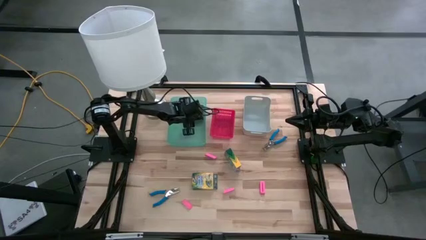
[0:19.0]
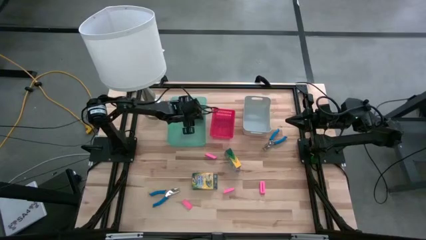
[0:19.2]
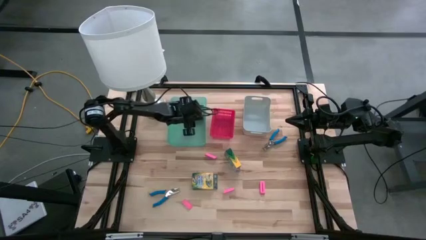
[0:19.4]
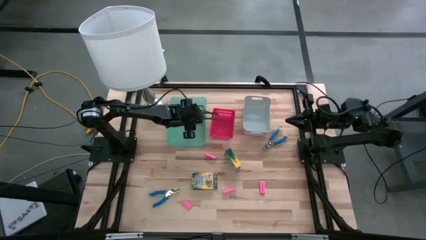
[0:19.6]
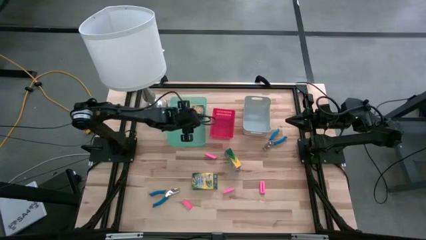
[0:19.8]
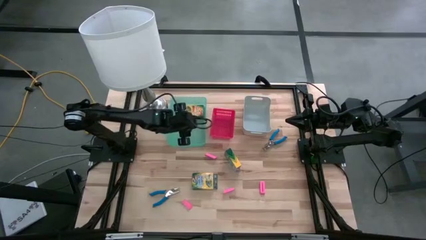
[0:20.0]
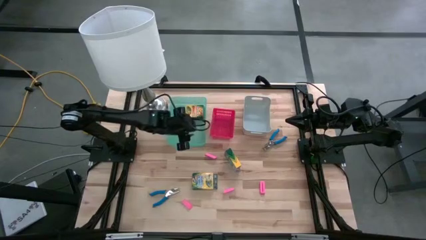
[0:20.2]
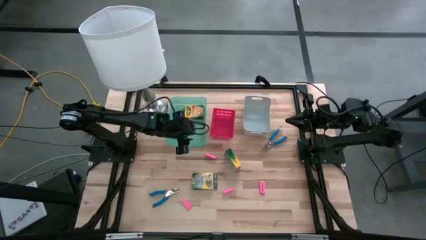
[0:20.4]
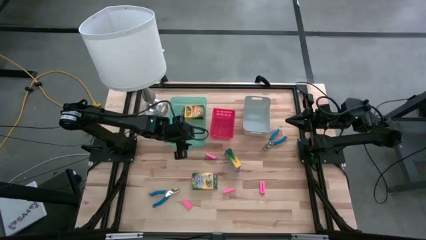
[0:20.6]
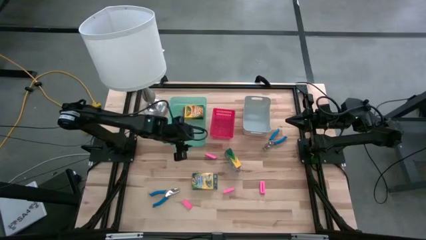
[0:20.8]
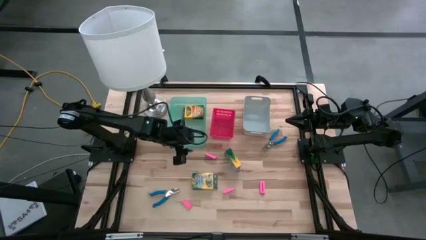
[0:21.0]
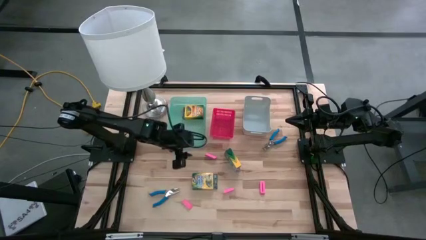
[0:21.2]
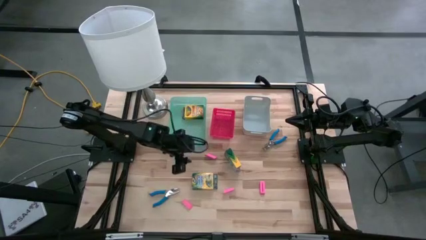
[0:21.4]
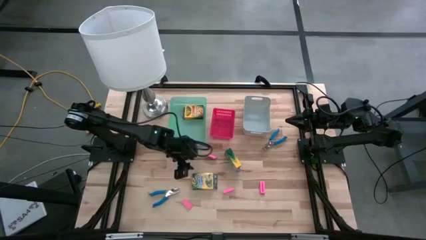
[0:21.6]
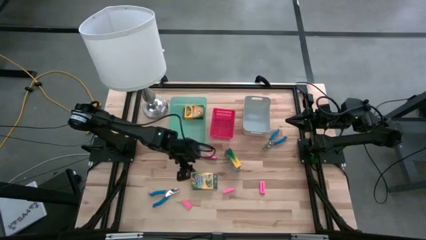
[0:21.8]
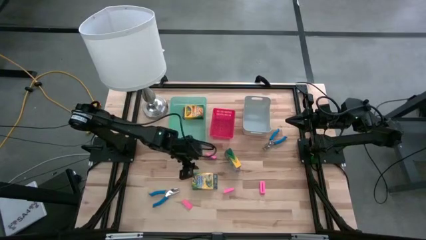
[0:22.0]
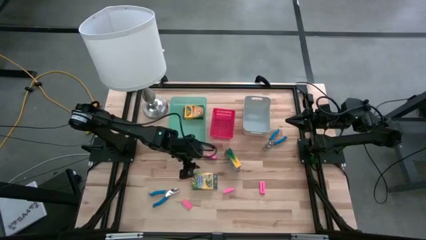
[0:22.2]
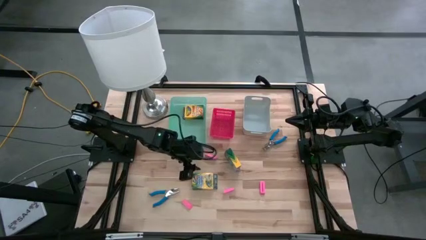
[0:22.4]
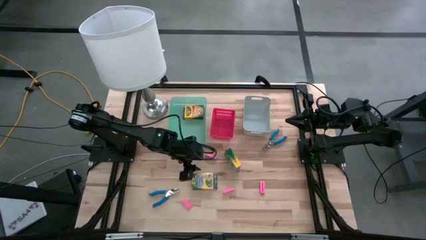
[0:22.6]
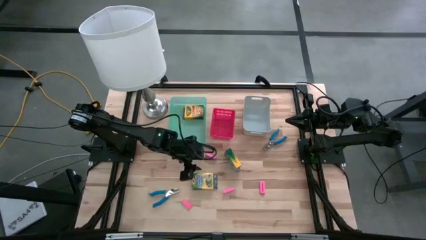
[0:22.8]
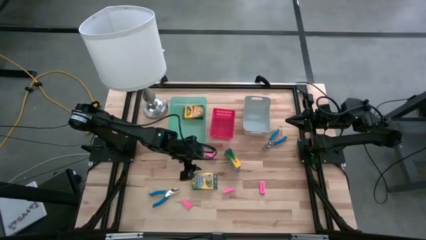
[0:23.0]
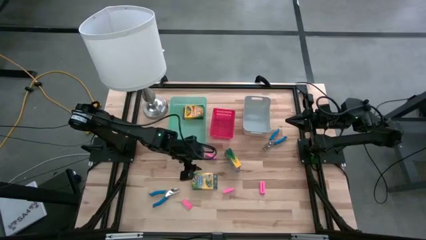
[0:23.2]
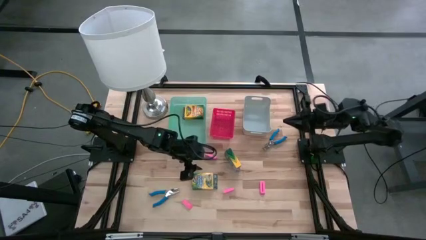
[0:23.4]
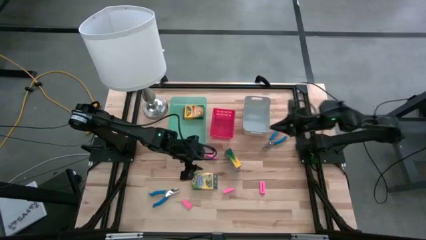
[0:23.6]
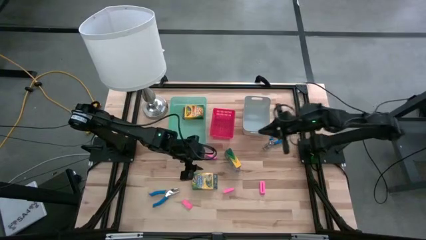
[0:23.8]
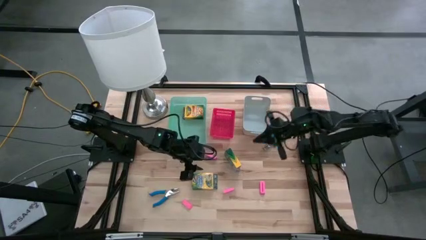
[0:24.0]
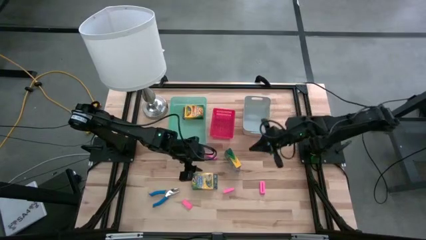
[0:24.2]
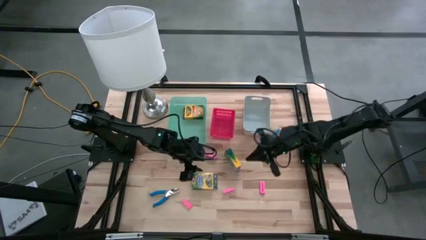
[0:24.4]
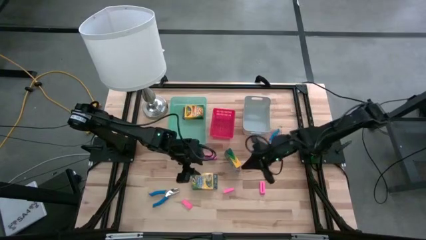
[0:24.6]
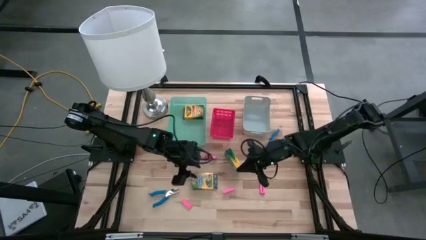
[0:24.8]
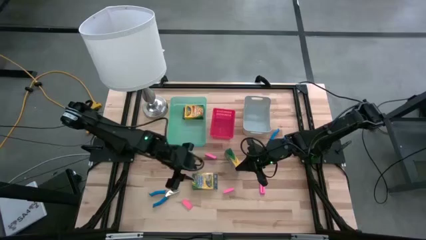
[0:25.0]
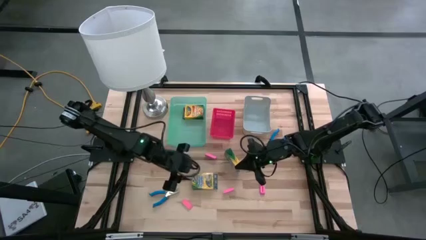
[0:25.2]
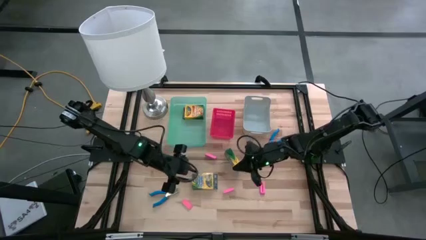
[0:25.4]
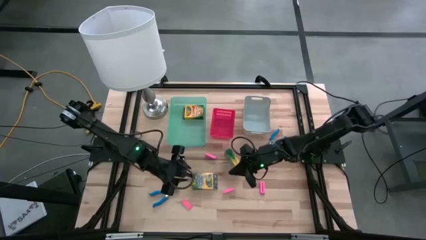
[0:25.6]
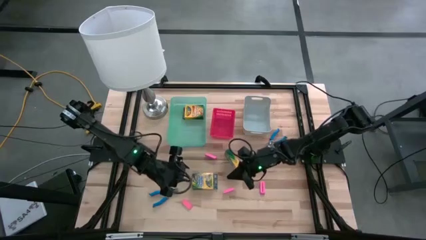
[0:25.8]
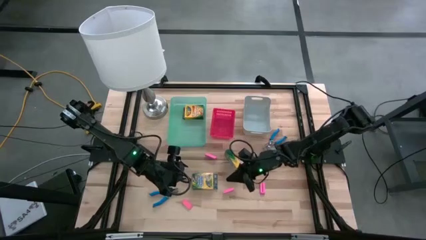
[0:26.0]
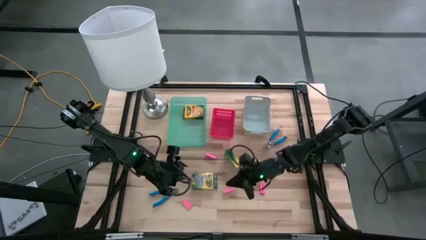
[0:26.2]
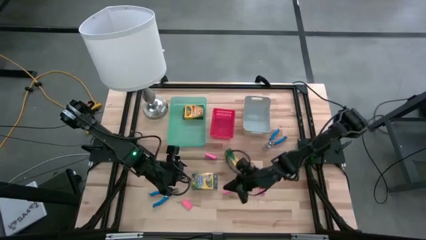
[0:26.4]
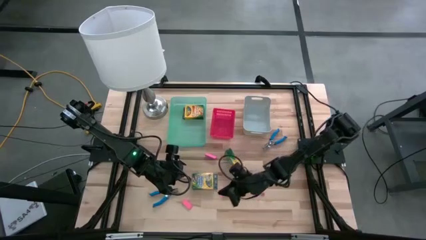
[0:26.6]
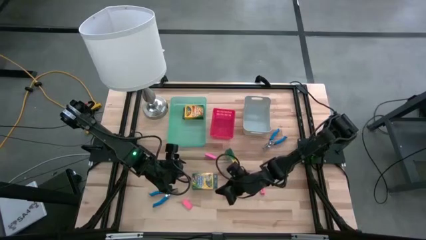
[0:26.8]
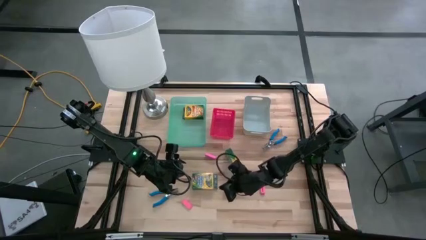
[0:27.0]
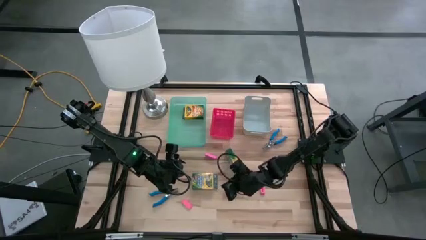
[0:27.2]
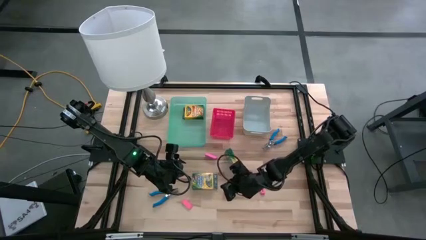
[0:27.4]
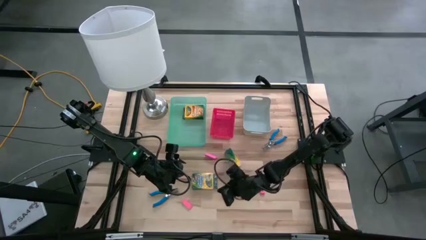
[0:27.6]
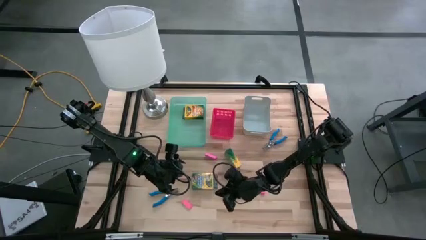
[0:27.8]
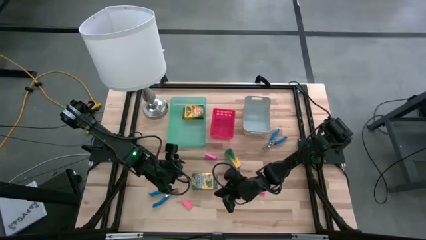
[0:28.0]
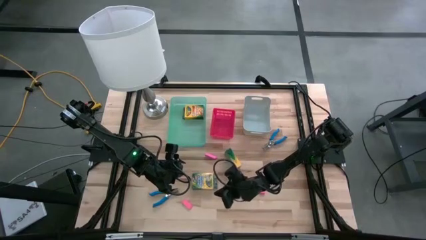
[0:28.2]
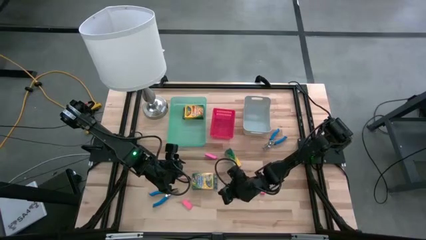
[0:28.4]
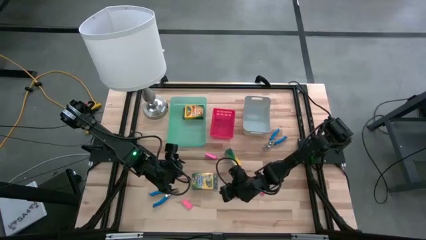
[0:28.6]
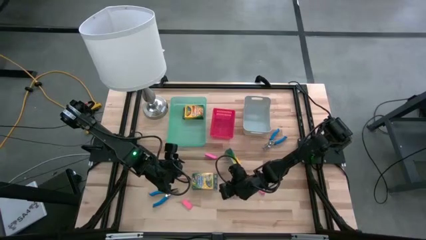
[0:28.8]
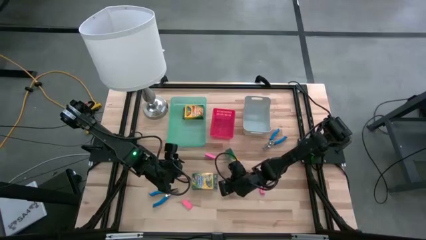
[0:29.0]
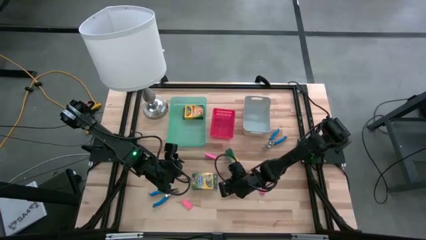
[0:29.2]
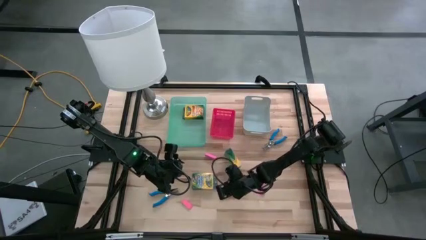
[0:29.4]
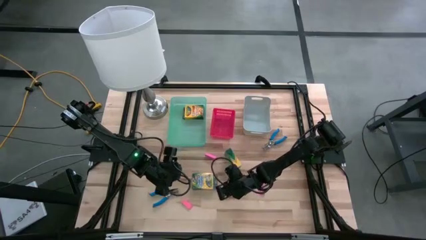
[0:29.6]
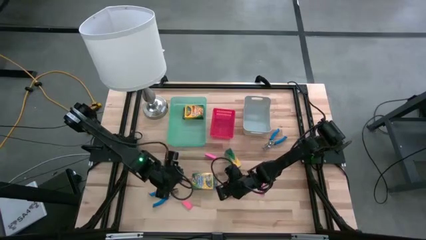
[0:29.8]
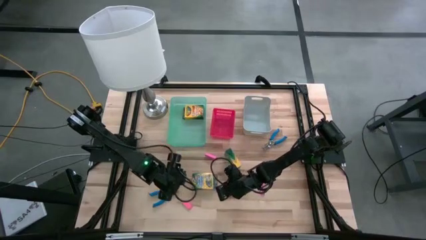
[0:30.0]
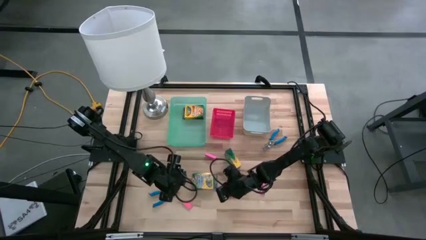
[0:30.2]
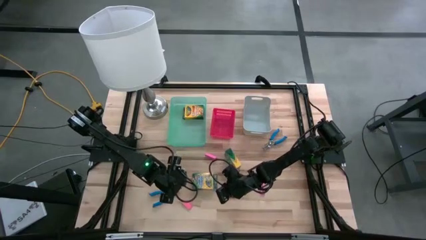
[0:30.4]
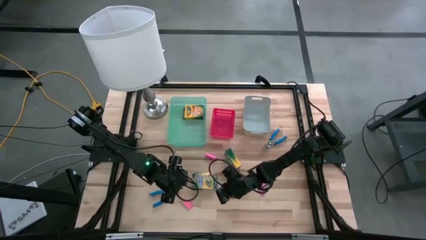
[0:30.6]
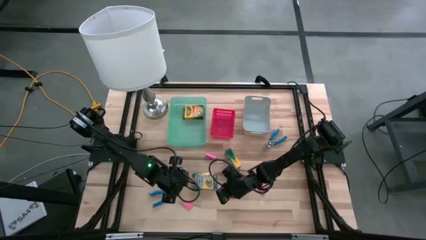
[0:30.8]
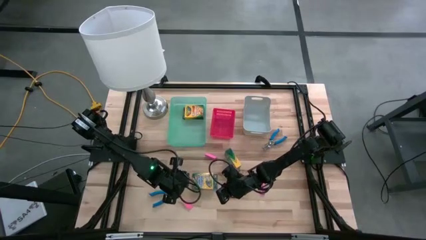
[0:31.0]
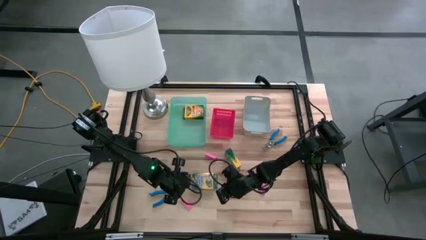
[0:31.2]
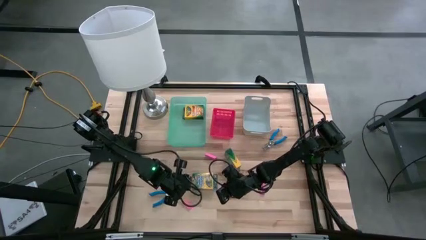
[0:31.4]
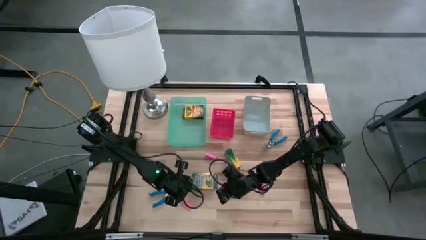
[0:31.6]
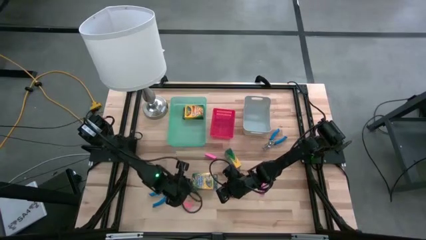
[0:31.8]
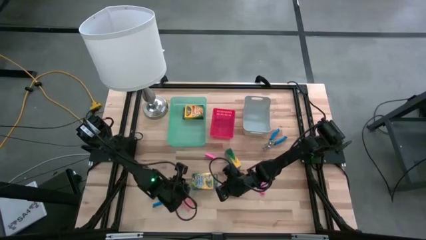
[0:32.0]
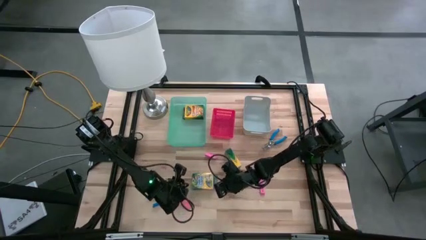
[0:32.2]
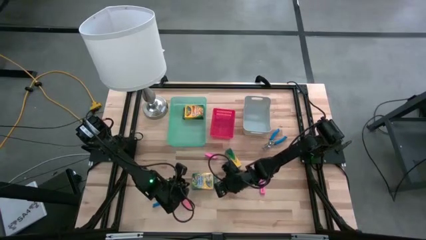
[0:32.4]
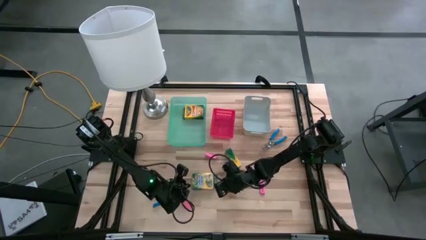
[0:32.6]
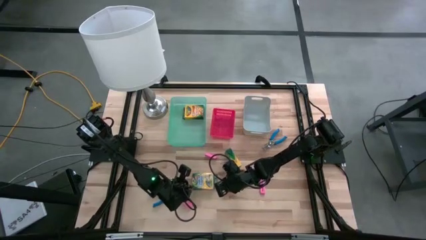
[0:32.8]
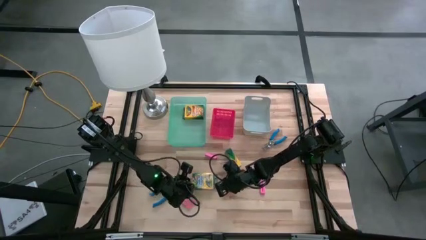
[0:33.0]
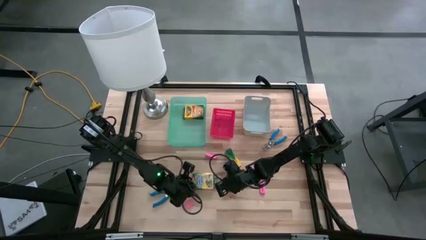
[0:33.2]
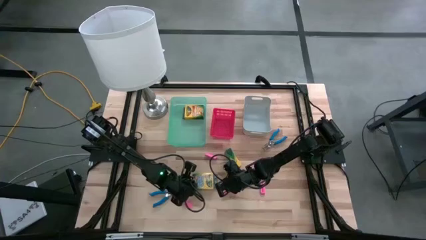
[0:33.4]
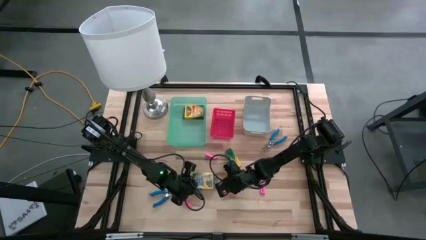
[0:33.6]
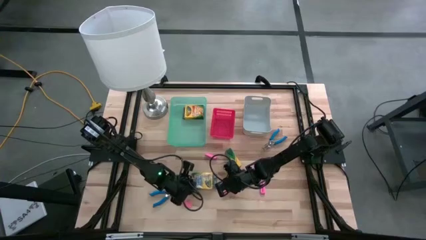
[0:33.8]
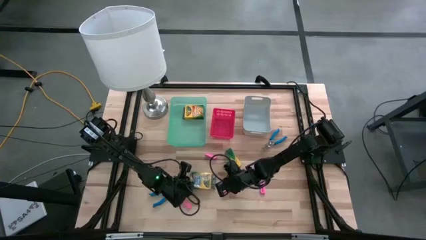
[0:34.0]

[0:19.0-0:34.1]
Task: Pick & Place School Supplies
Put the yellow crayon box into the green bin
